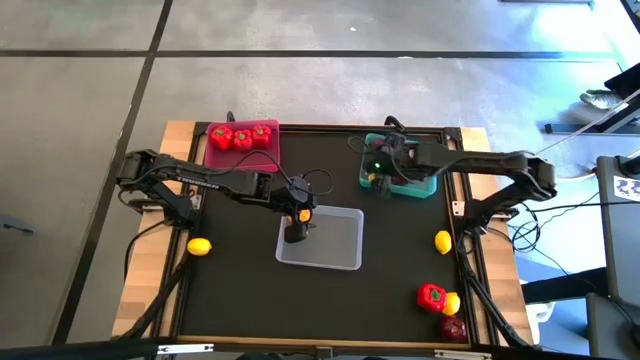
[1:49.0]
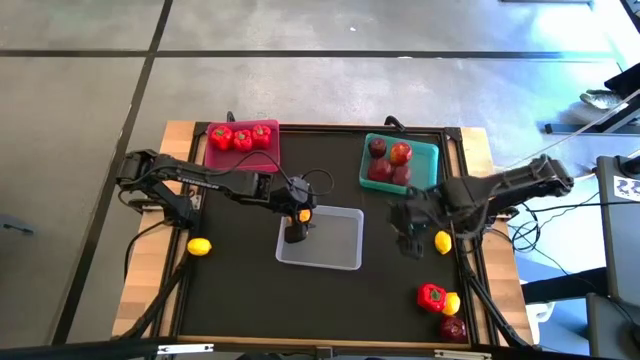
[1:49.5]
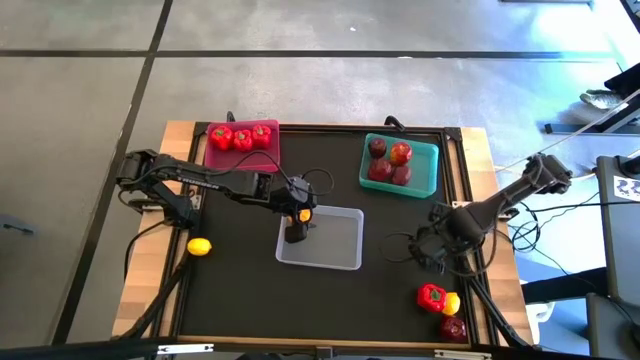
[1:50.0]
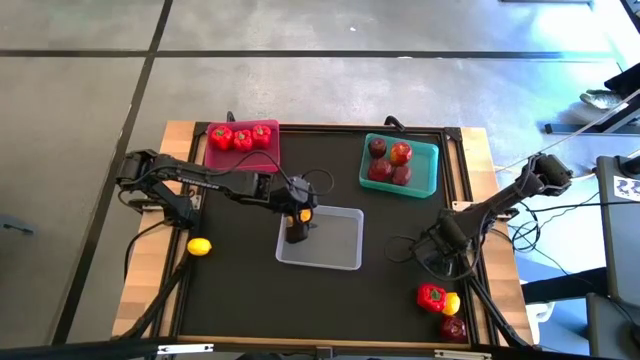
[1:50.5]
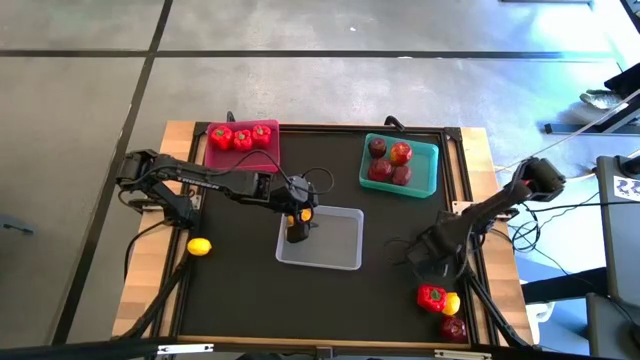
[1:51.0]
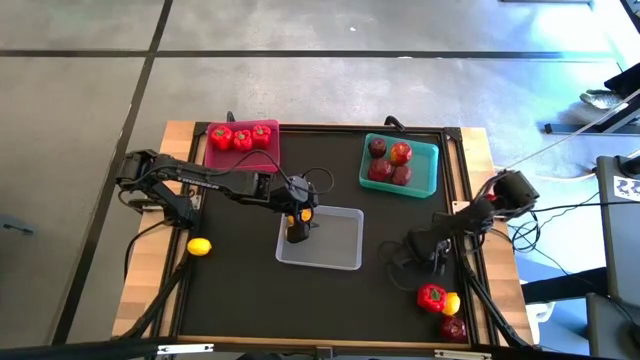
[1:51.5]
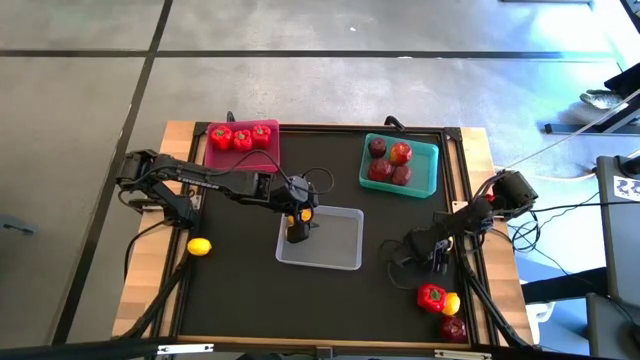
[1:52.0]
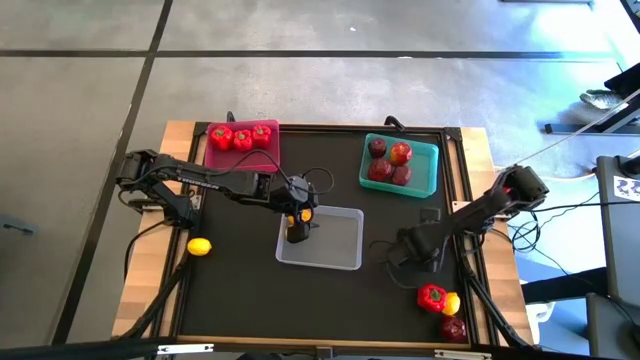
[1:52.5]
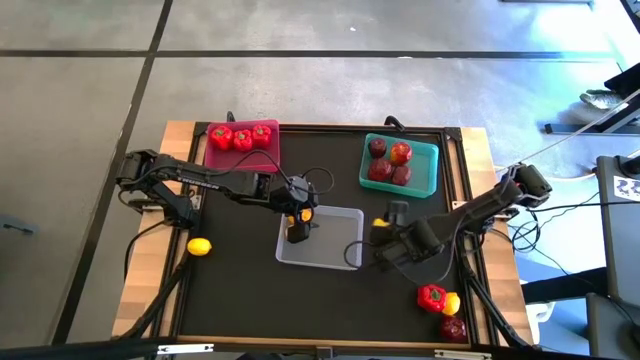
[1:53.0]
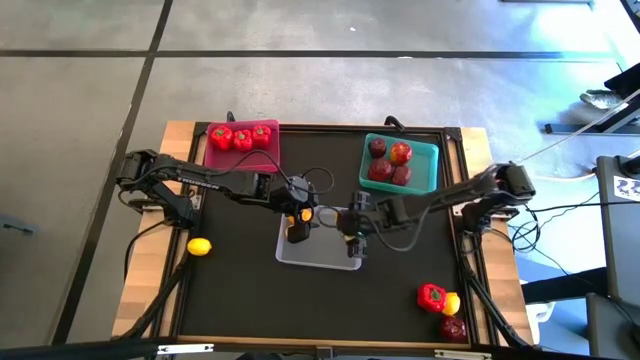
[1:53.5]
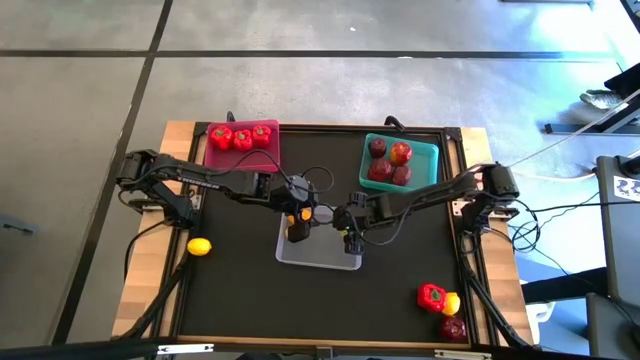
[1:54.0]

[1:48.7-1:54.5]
Task: Sort produce into baskets
Put the lemon into the white bin

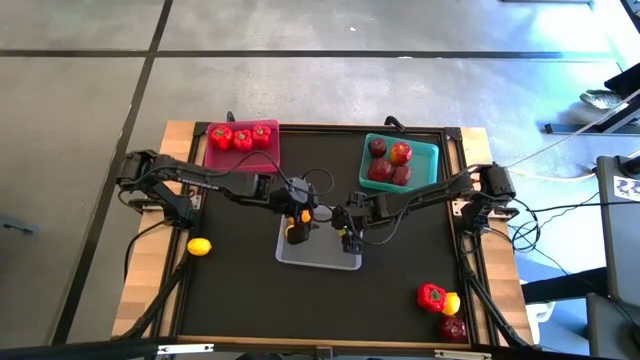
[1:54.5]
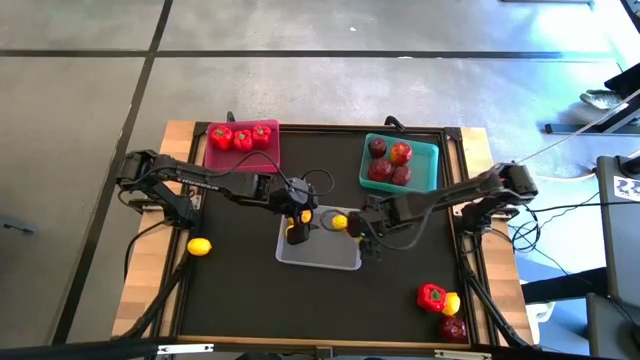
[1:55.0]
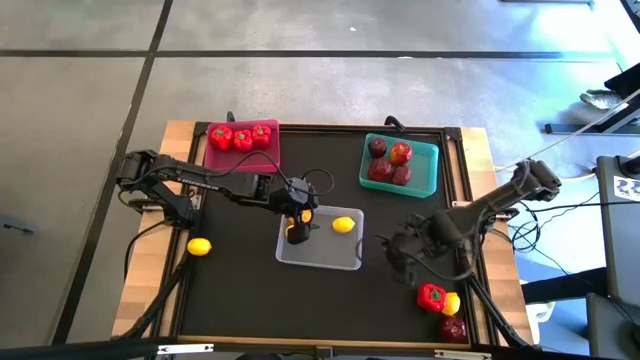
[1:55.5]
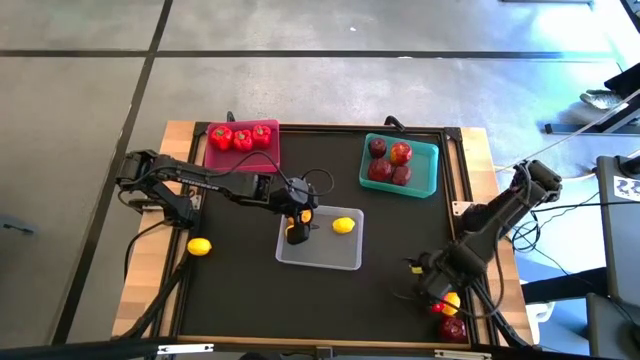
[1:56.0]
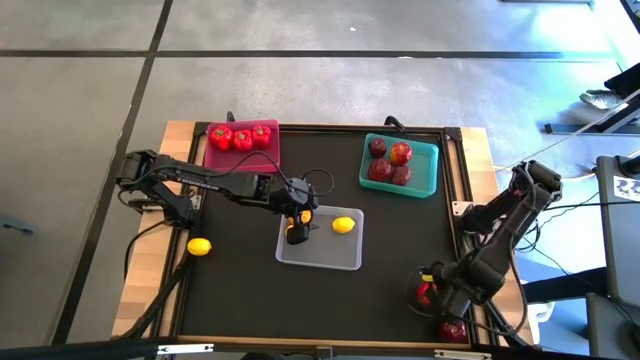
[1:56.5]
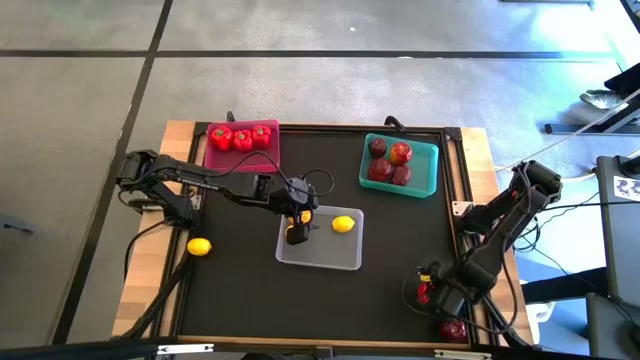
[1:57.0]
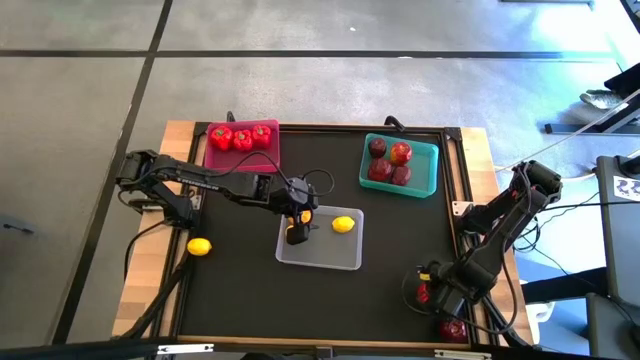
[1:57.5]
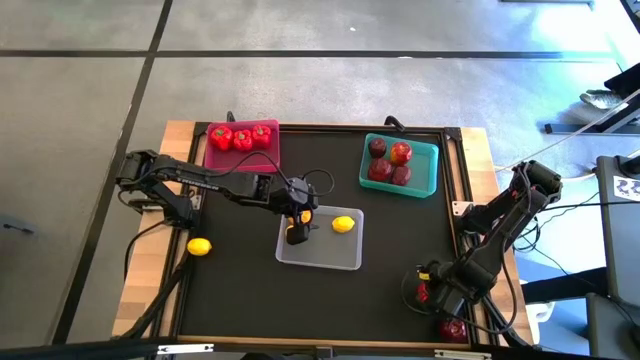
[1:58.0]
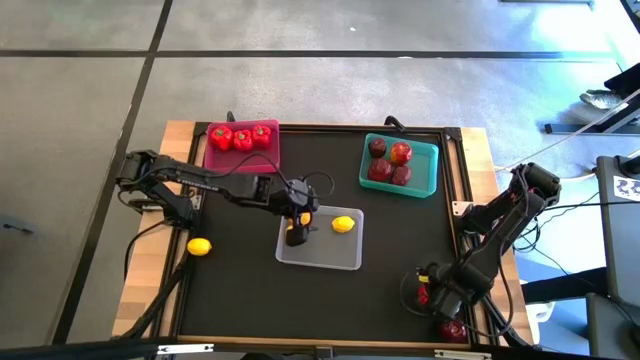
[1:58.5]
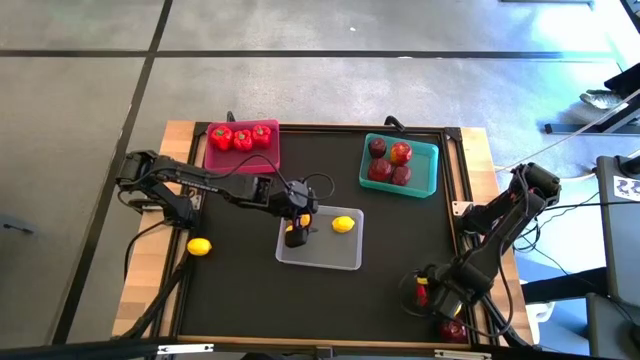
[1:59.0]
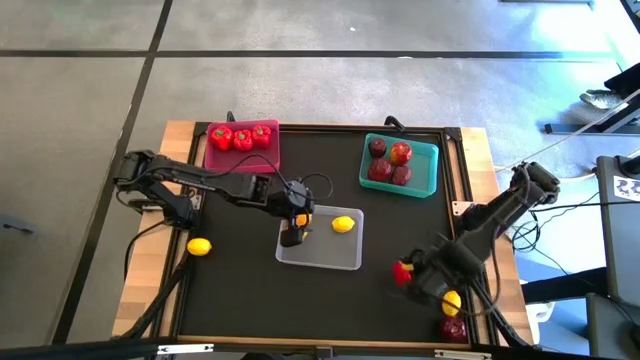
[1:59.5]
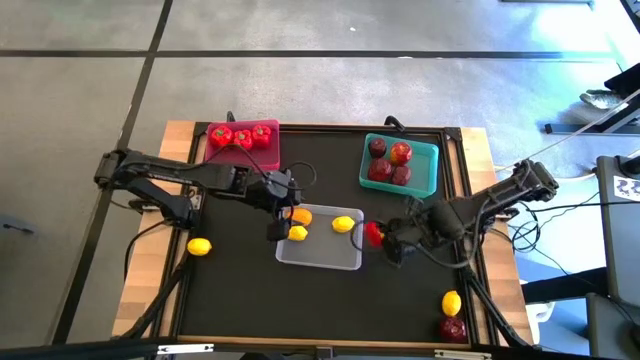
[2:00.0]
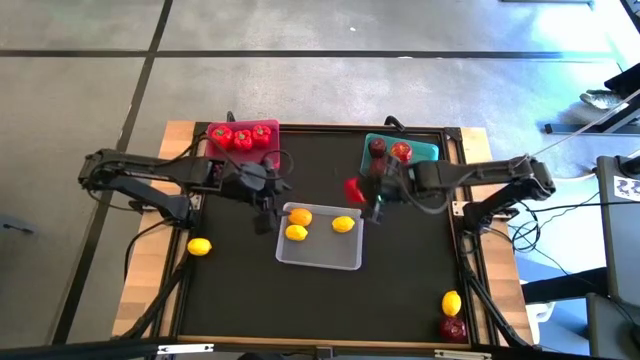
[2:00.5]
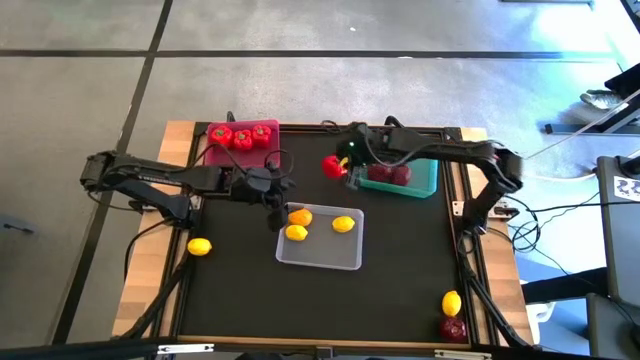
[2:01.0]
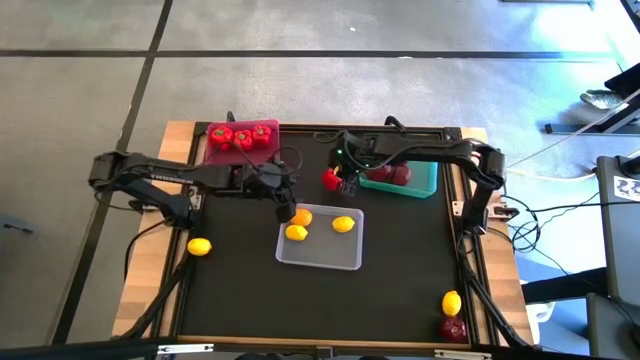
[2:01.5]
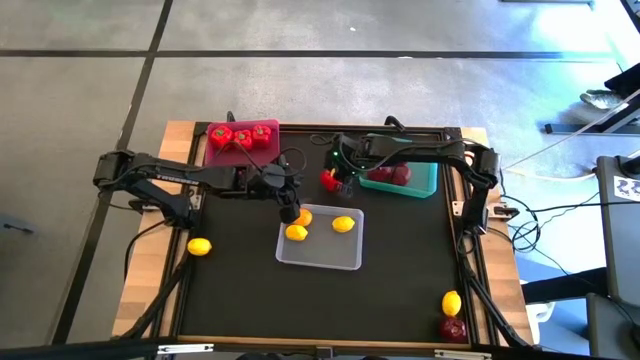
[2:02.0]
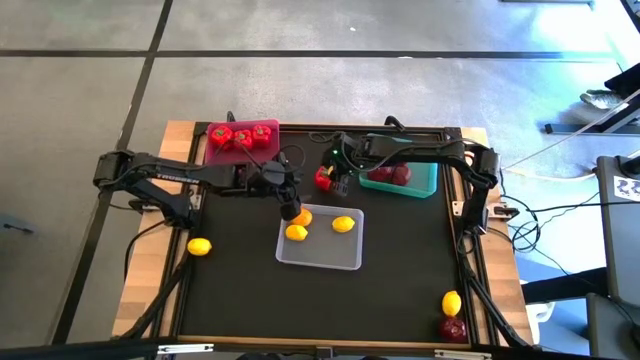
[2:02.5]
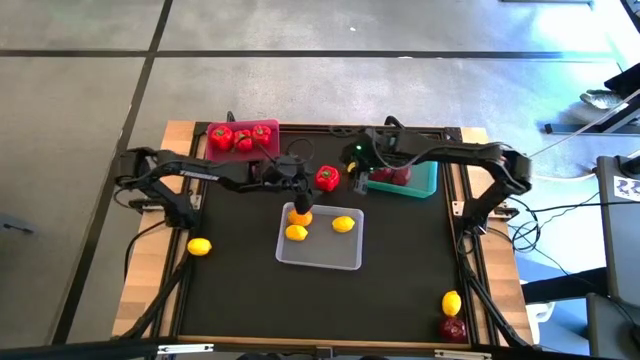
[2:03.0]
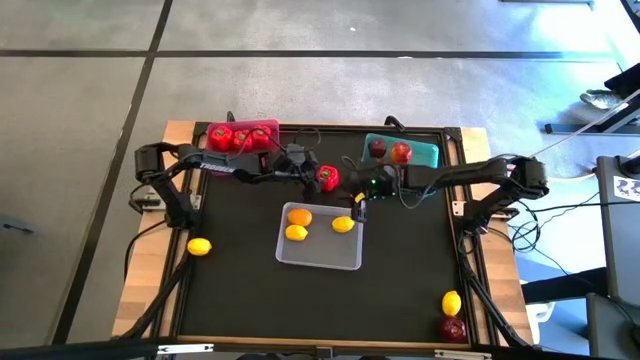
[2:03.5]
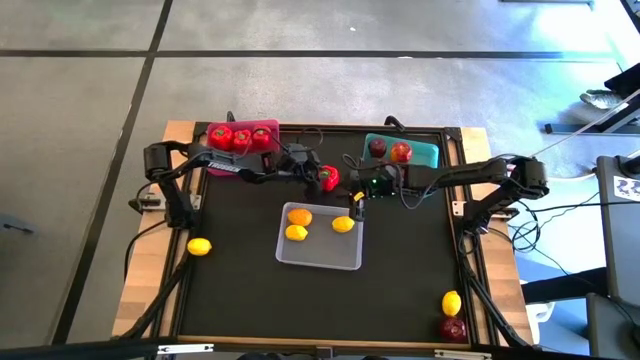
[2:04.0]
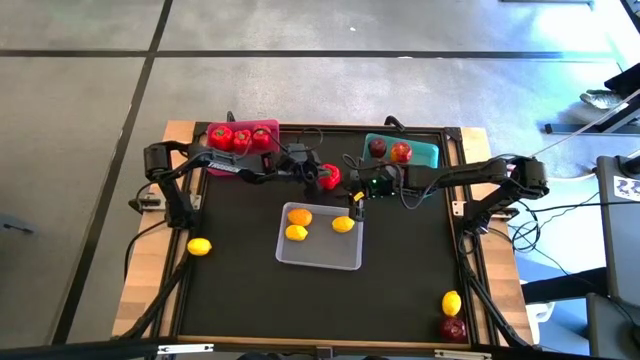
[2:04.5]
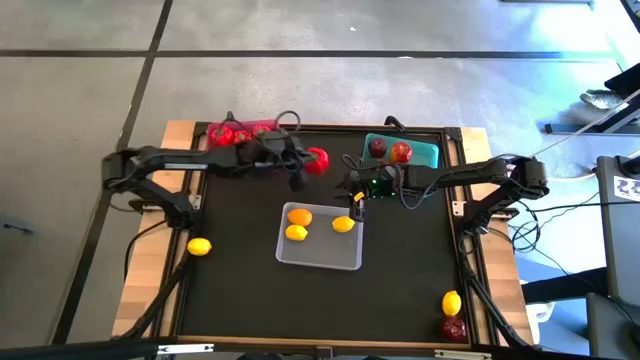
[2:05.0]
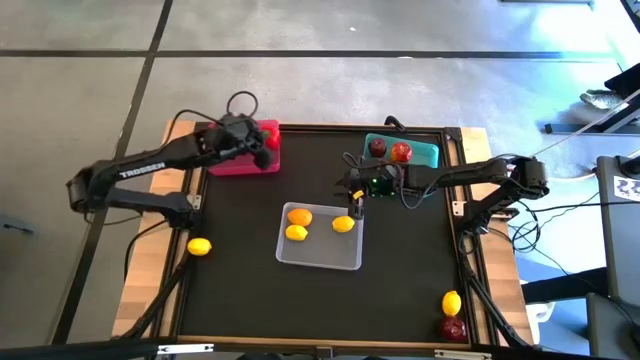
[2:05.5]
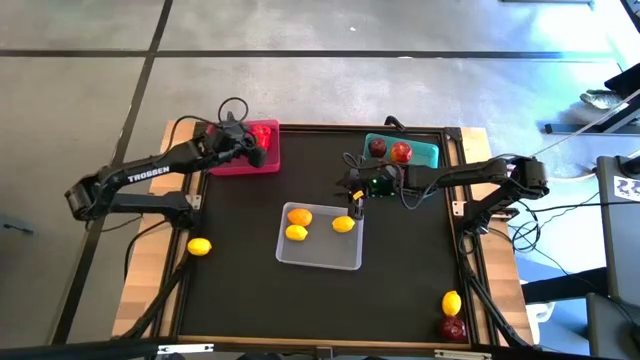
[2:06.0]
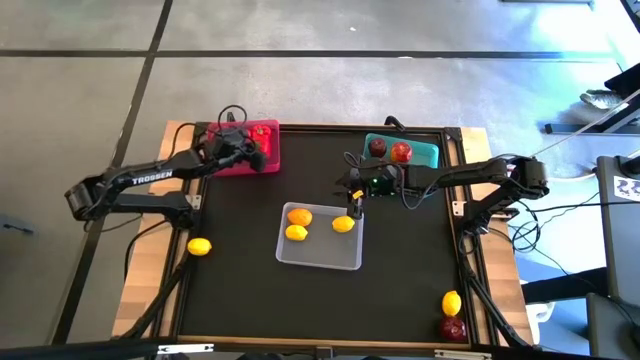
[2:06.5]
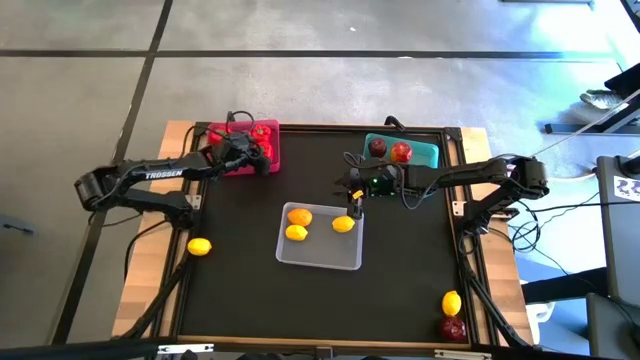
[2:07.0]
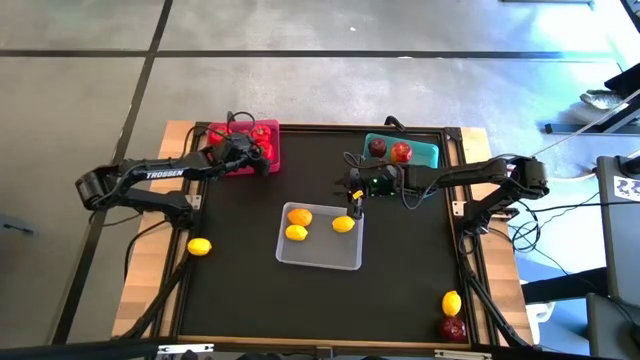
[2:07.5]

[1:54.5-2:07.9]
Put the bell pepper into the red bin

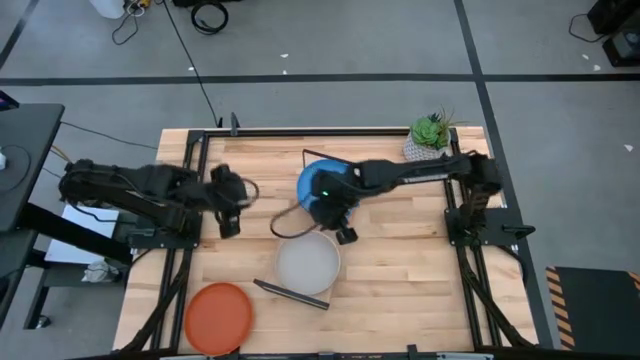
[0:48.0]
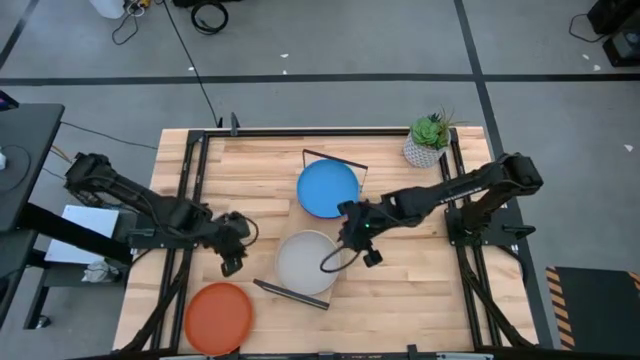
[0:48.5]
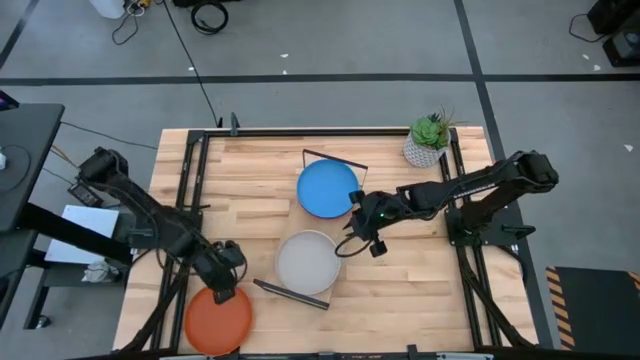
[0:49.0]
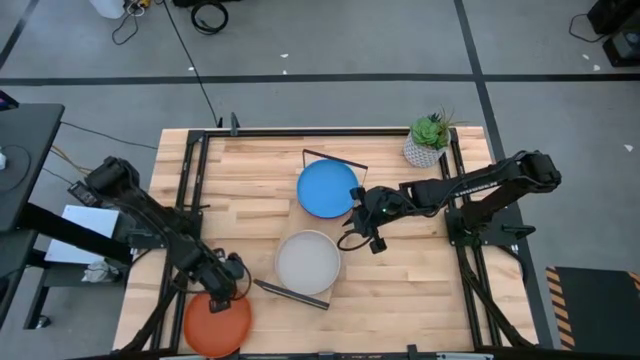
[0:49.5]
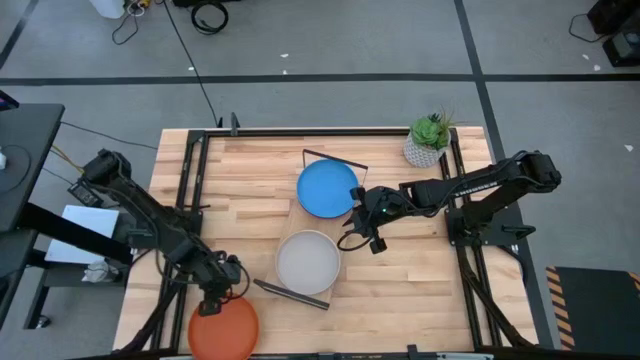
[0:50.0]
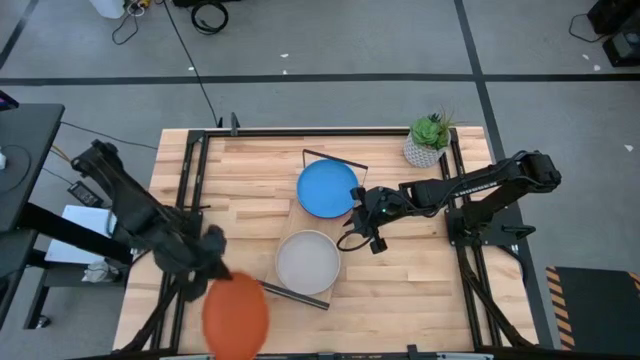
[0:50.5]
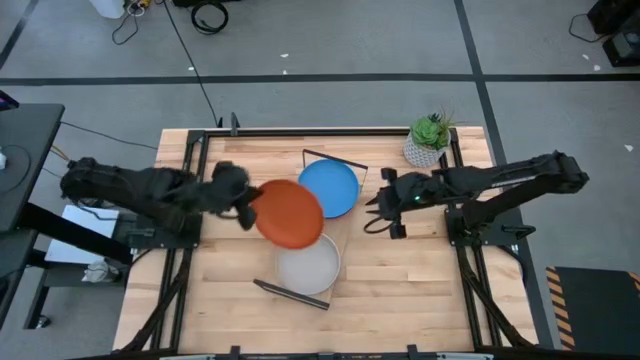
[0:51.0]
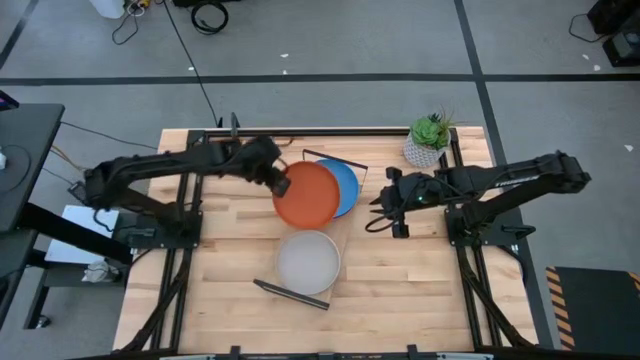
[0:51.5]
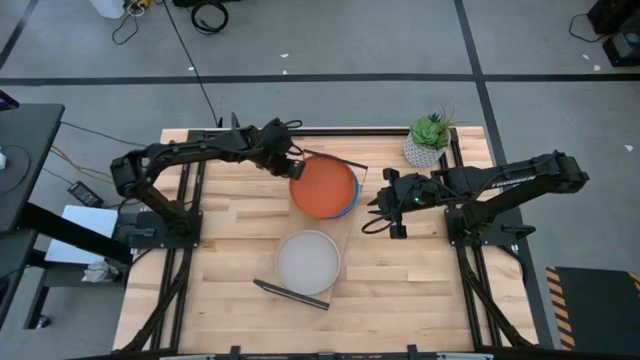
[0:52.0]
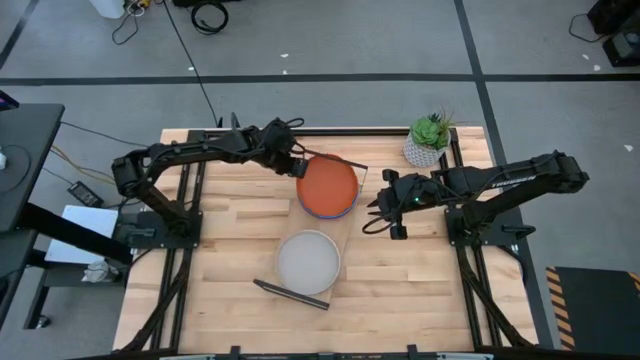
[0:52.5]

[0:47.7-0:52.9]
Task: Place and stack plates onto a shelf
Stack the orange plate on top of the blue plate on the shelf
